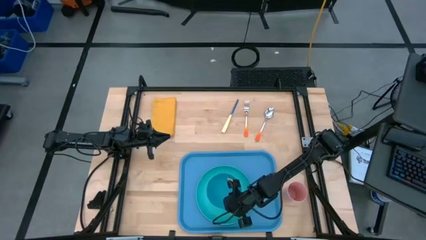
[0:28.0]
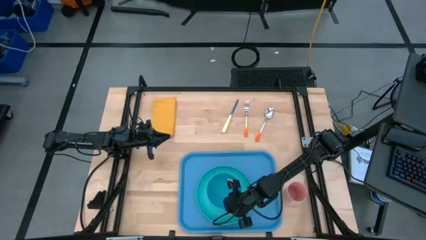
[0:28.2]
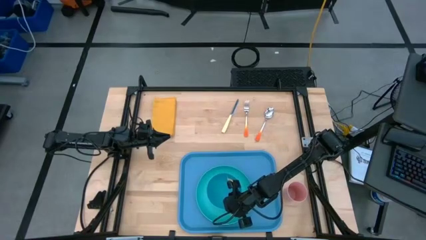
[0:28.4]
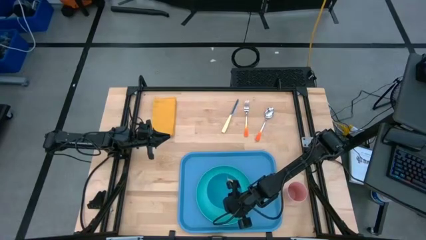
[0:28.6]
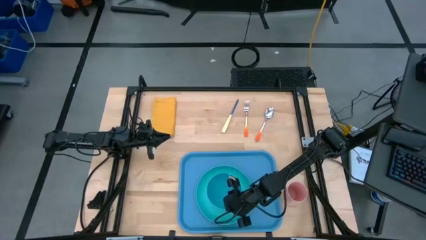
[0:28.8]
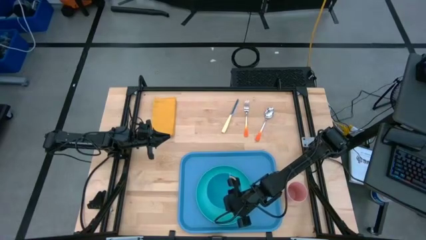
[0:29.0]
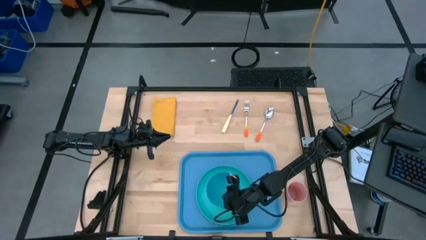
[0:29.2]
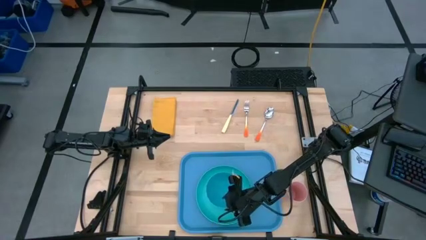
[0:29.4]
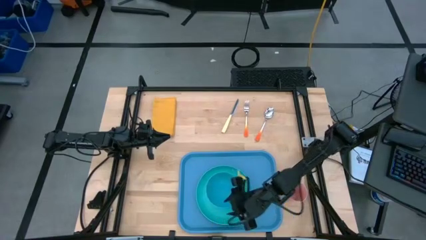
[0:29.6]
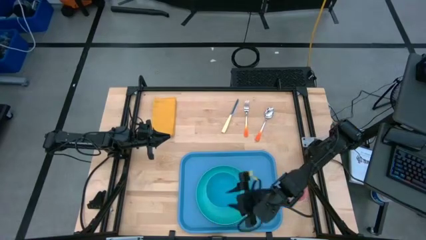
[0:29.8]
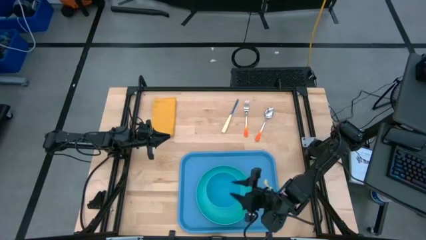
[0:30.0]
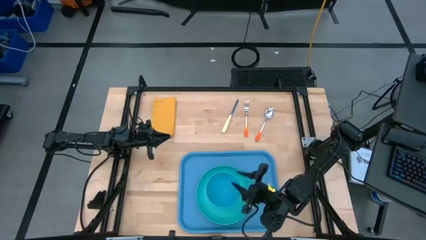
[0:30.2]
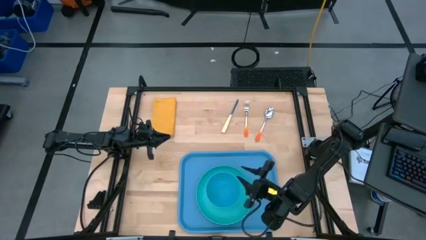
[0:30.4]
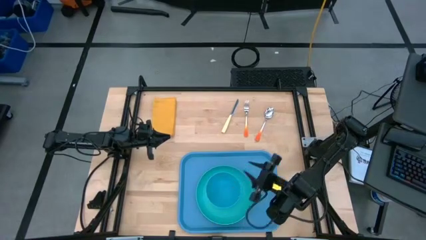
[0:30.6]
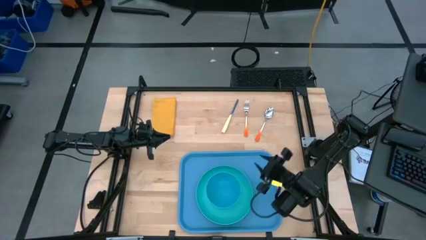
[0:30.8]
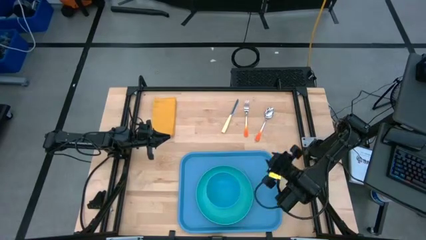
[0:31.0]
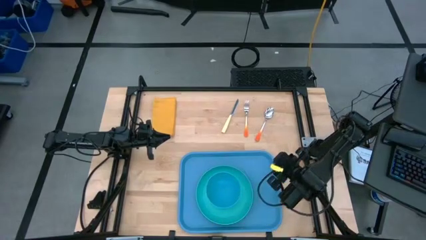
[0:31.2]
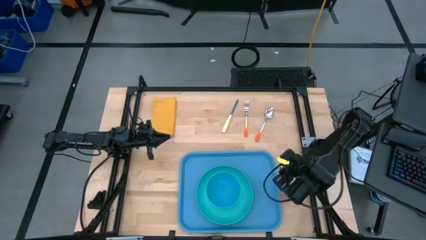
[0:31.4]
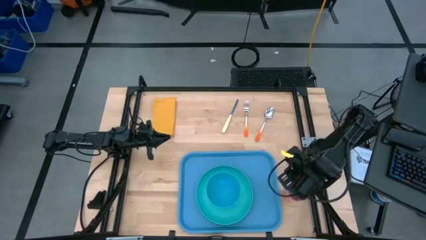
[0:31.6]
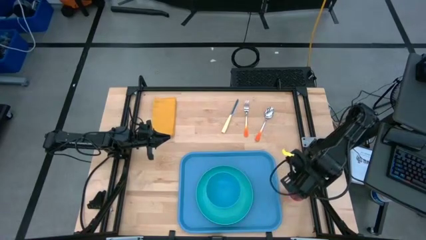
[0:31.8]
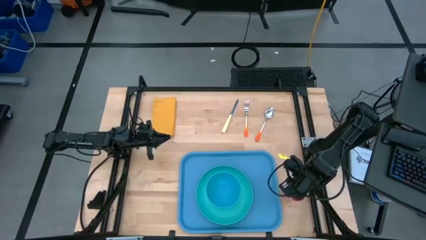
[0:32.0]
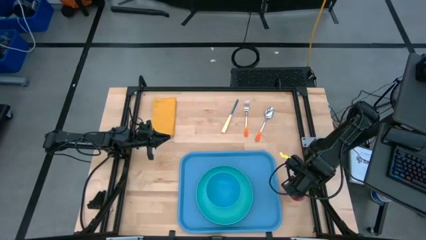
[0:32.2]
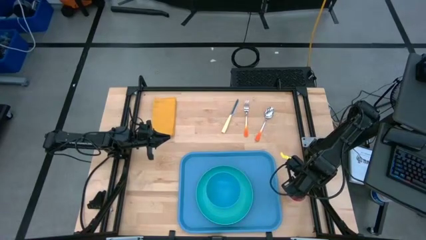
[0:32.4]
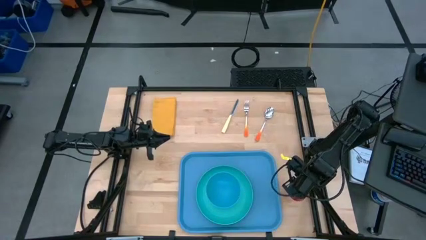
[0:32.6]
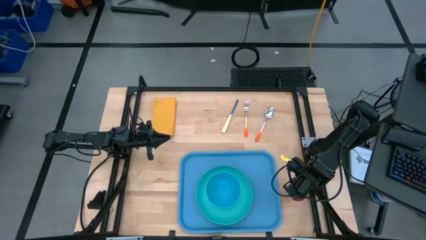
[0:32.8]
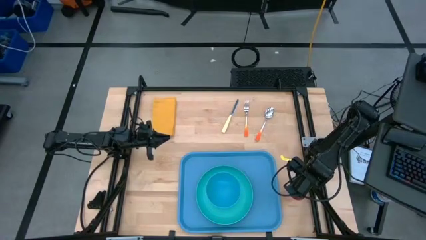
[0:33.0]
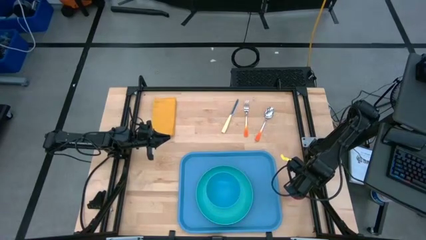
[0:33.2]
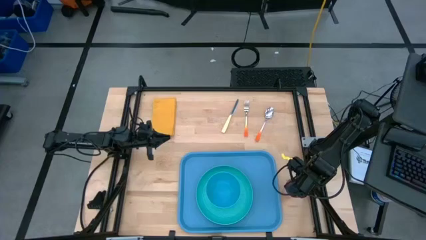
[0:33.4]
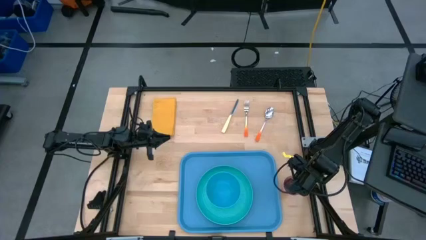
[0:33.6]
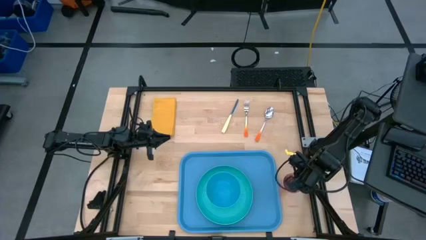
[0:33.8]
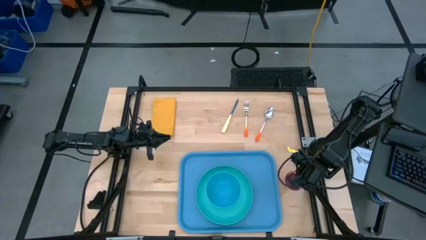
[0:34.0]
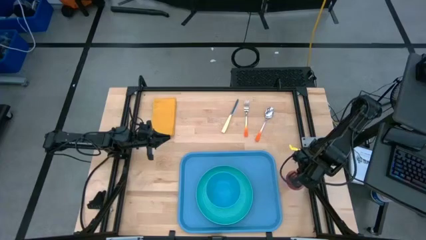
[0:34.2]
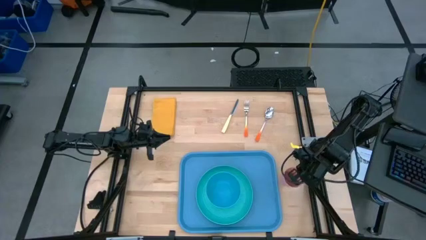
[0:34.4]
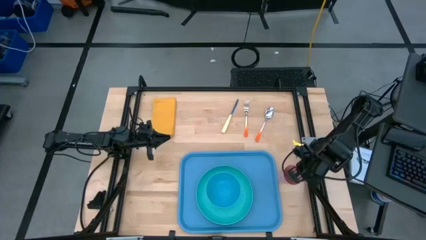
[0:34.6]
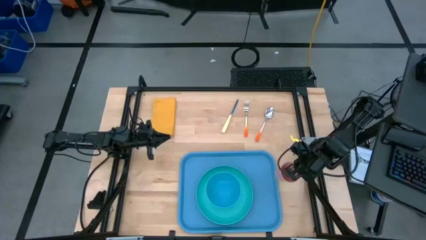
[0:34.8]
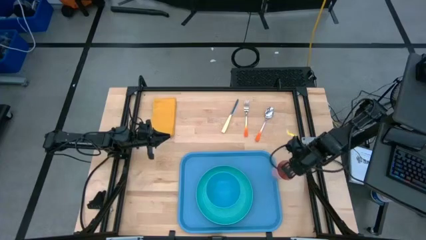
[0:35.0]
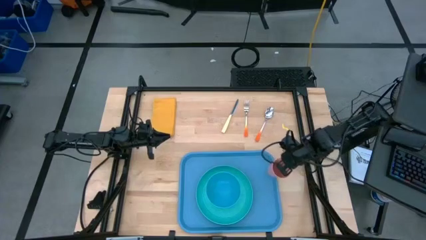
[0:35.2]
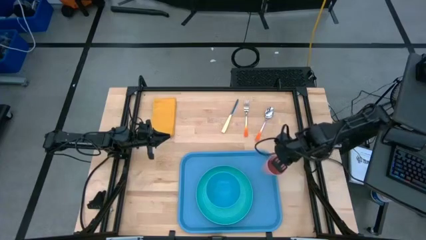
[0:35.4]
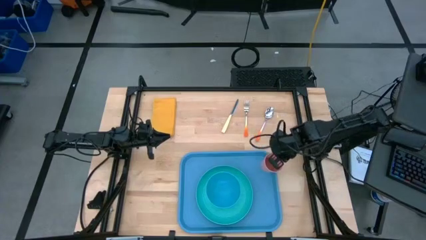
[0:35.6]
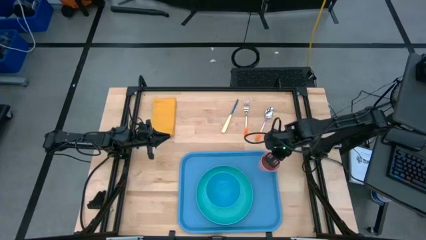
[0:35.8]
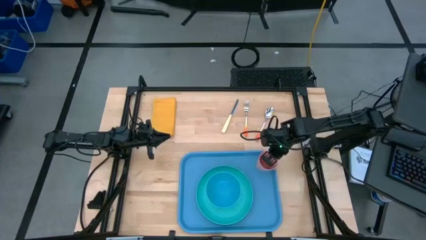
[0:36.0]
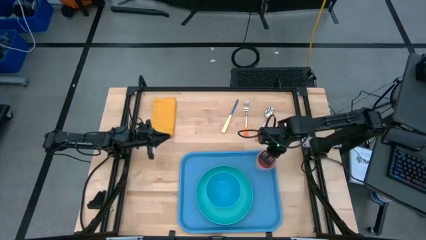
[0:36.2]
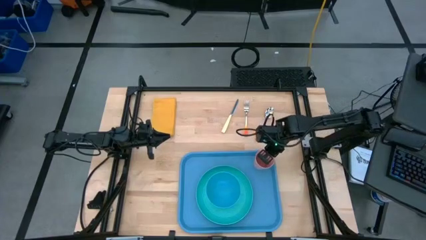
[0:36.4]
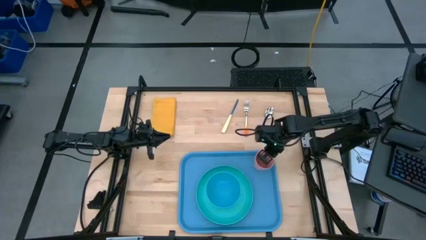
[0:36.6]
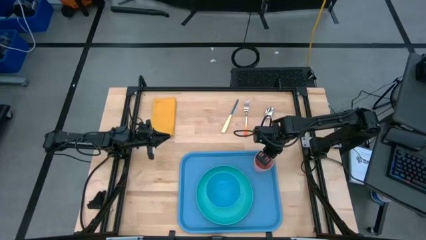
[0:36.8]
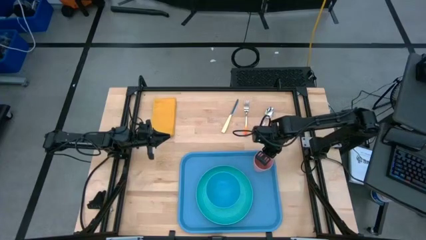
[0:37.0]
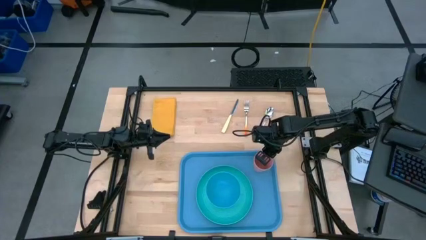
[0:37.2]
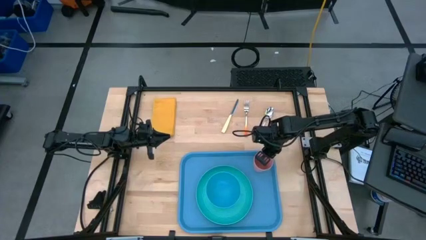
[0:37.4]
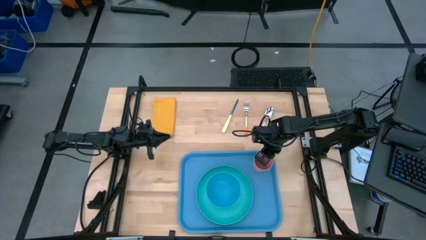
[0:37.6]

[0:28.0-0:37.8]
Task: Set up tray
Put the pink cup to the top right of the green plate on the blue serving tray

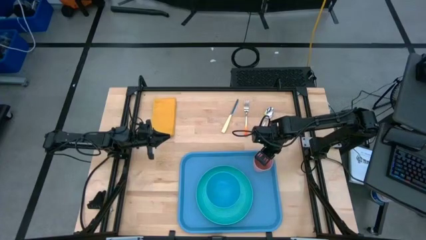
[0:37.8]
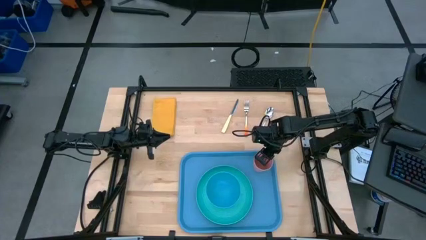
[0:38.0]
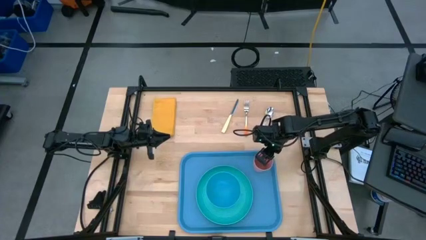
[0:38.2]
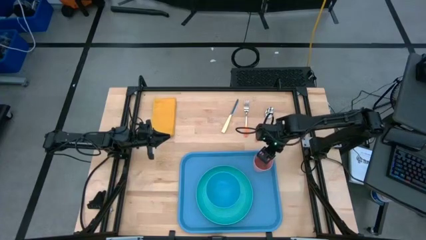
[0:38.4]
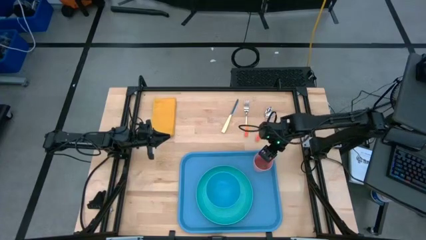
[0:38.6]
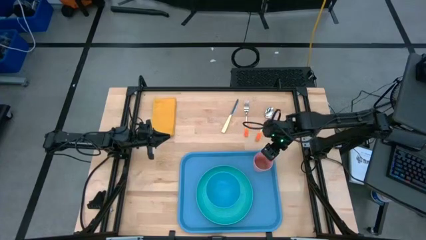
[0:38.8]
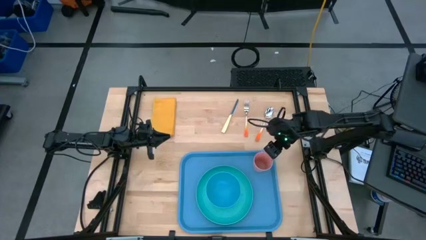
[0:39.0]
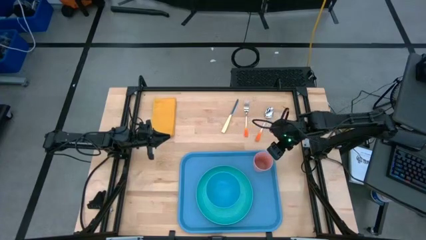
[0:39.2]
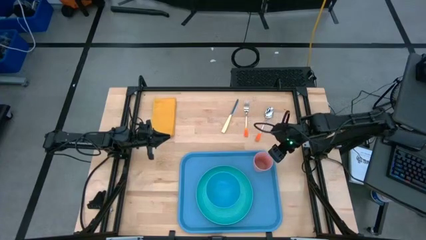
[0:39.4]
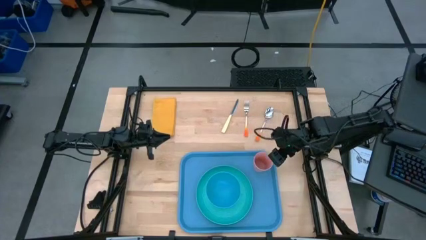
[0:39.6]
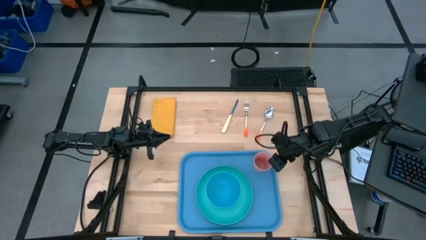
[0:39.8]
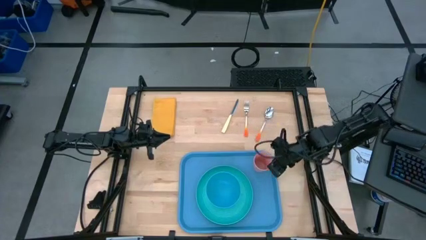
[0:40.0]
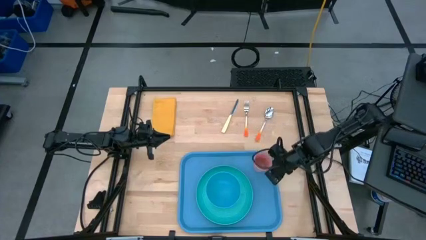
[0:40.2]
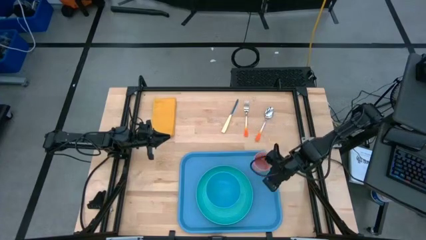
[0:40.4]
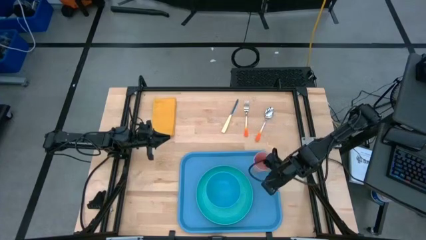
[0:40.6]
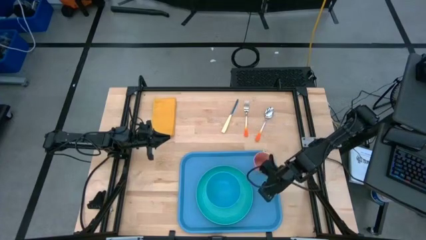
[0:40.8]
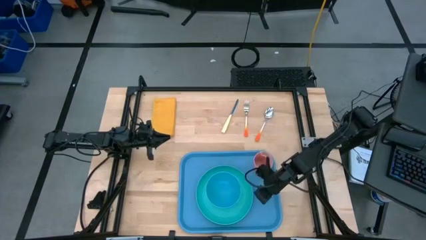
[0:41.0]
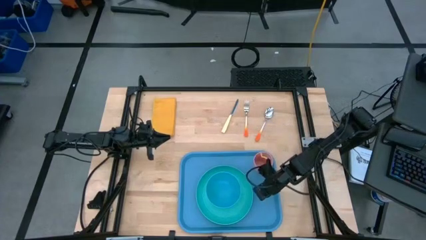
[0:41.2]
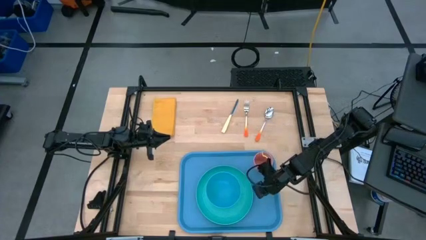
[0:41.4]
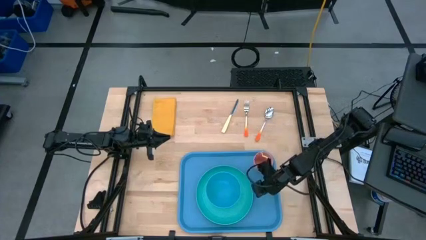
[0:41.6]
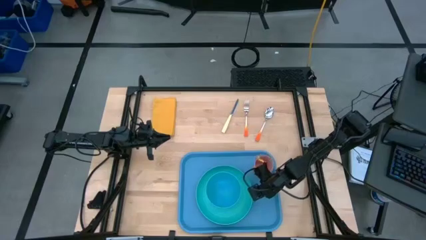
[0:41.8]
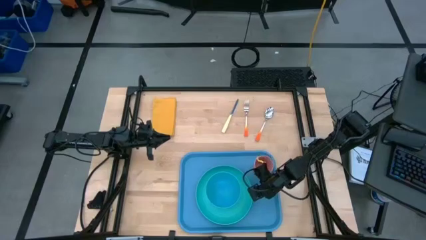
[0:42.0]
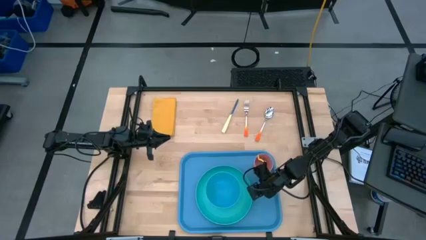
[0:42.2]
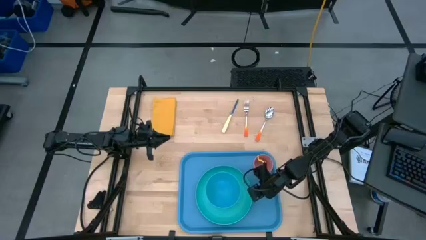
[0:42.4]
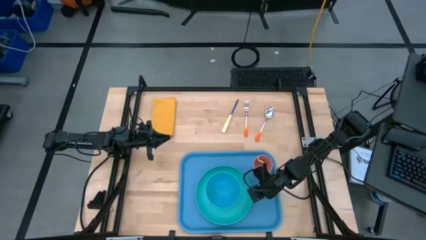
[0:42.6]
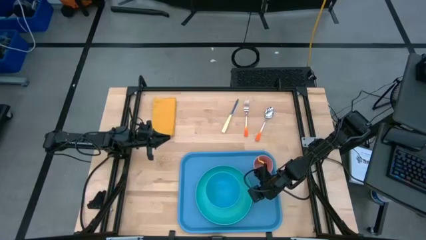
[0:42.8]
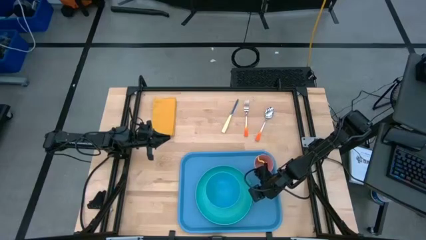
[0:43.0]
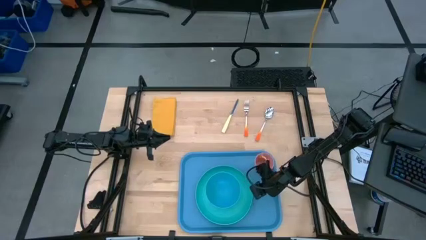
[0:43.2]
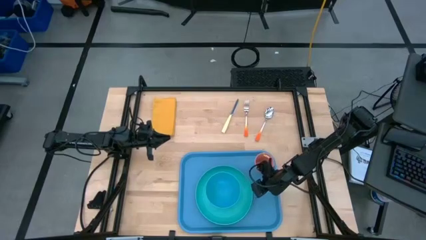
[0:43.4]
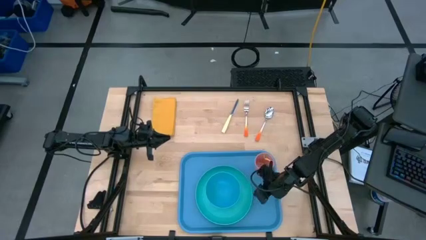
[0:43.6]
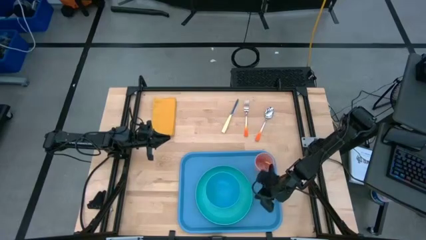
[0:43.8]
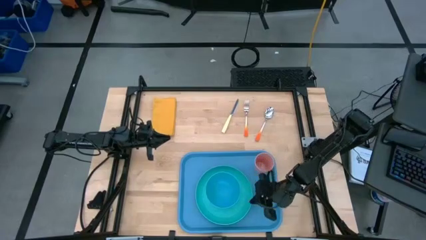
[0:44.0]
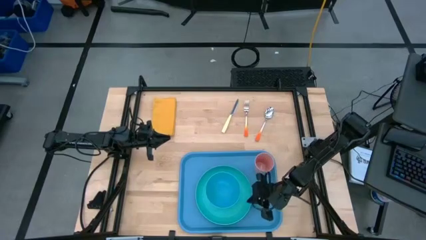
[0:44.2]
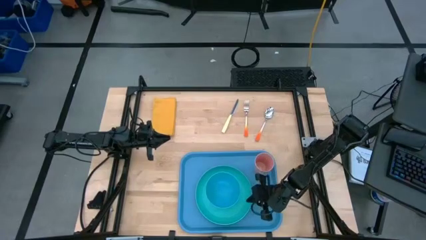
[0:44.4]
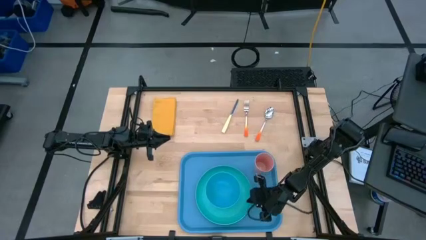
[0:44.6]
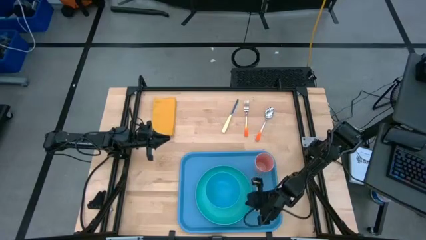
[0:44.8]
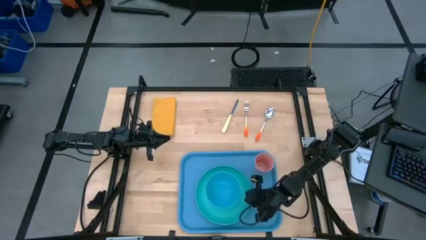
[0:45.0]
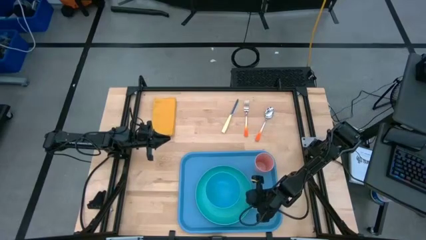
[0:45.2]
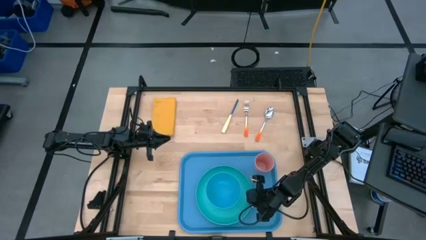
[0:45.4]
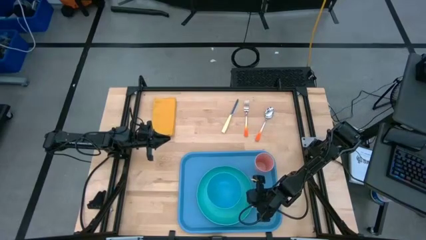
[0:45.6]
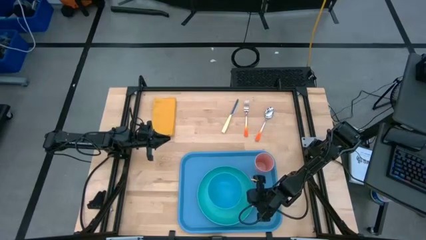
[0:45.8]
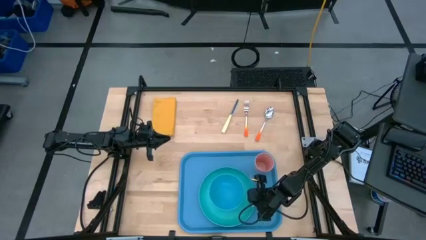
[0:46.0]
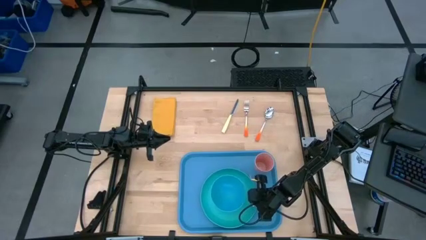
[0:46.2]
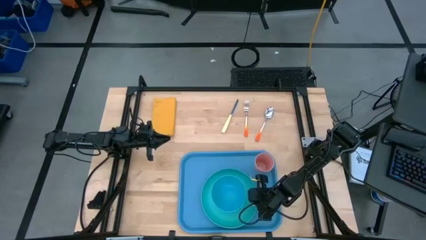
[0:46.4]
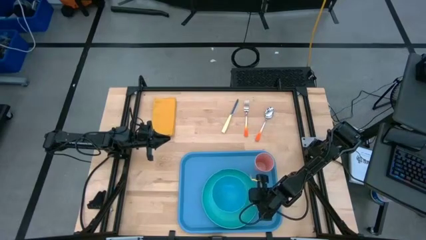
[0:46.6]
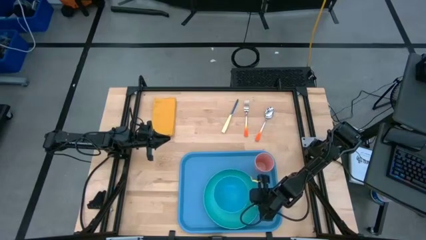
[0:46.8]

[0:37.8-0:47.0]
Adjust the green plate on the tray
